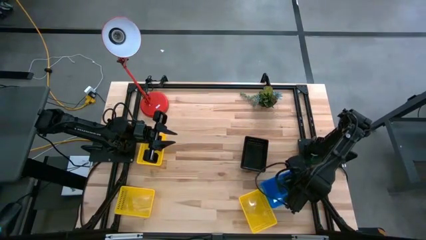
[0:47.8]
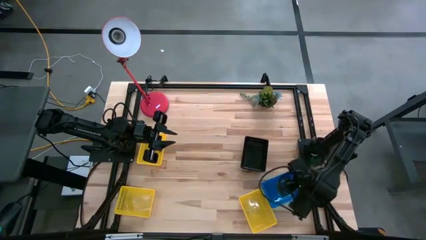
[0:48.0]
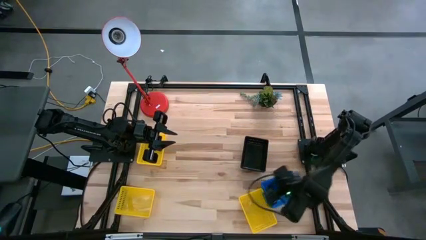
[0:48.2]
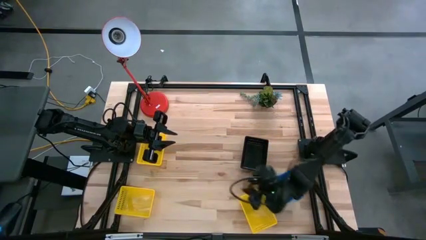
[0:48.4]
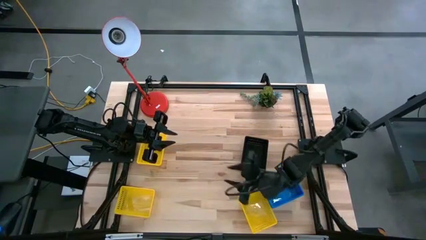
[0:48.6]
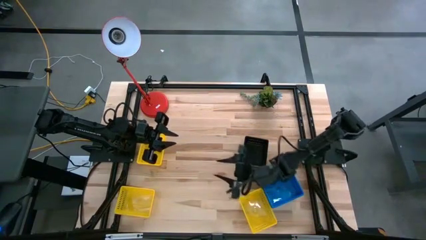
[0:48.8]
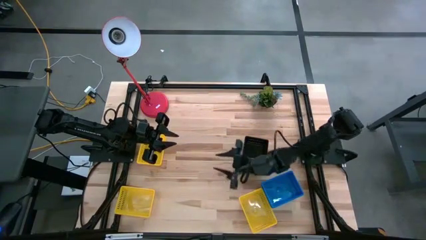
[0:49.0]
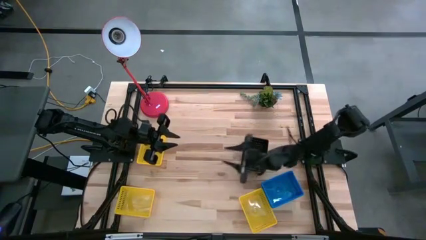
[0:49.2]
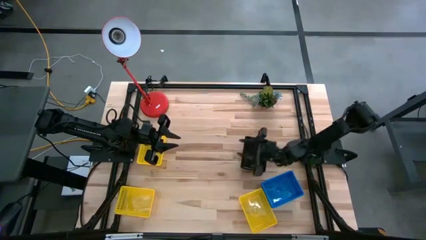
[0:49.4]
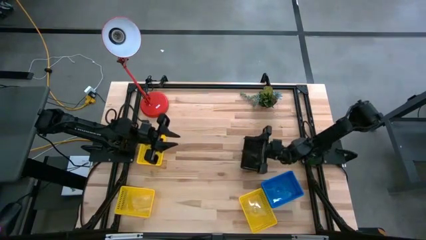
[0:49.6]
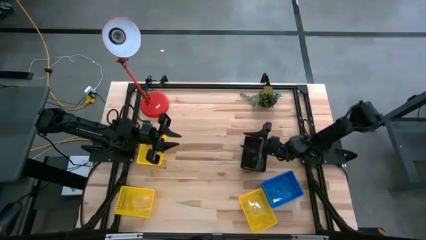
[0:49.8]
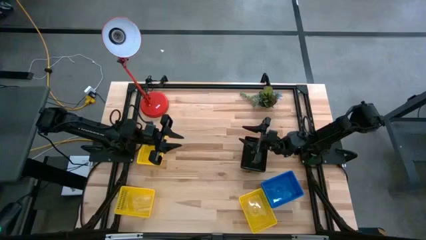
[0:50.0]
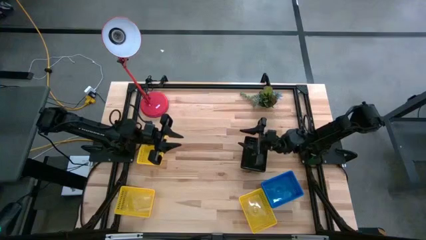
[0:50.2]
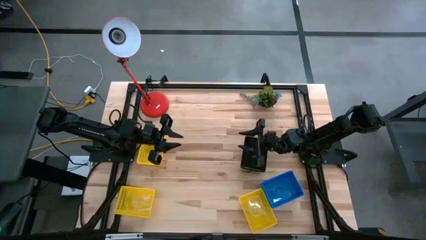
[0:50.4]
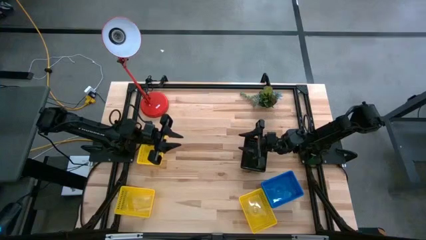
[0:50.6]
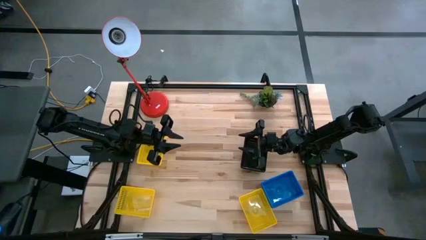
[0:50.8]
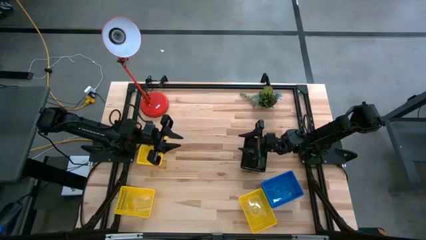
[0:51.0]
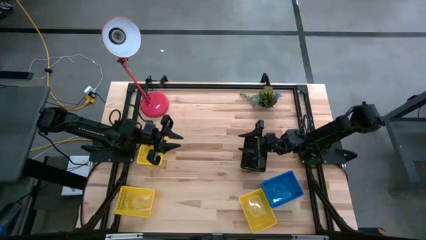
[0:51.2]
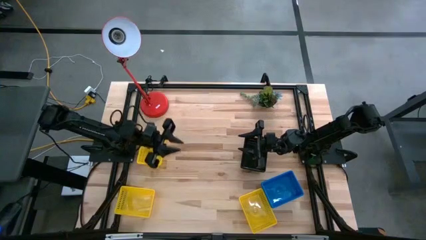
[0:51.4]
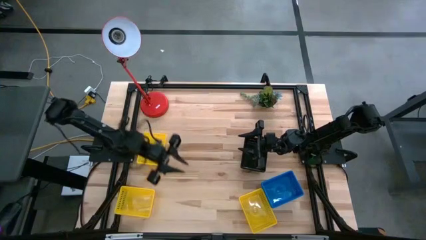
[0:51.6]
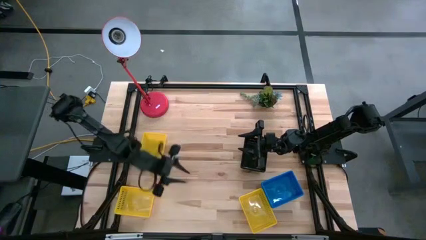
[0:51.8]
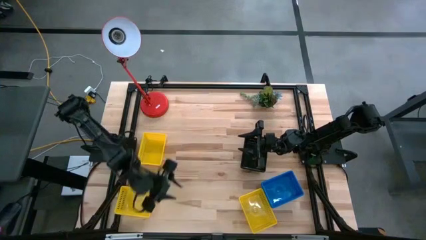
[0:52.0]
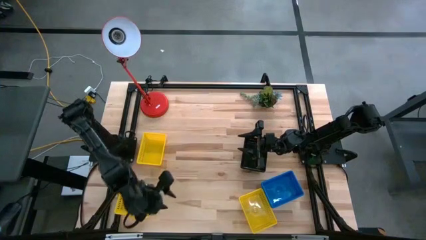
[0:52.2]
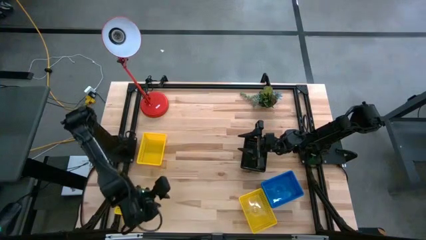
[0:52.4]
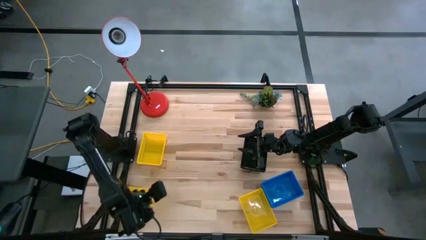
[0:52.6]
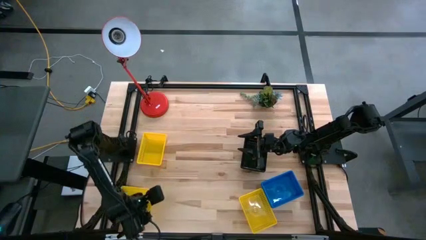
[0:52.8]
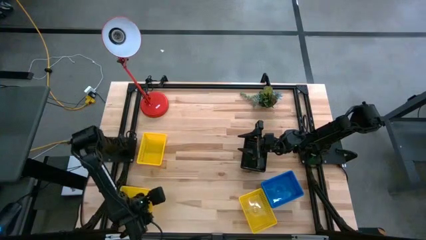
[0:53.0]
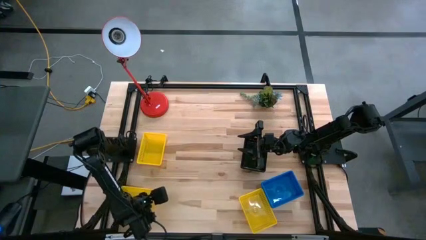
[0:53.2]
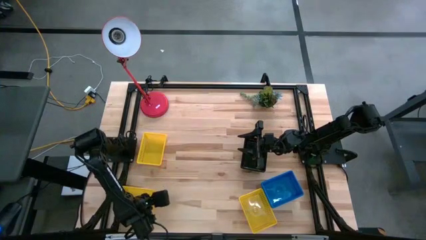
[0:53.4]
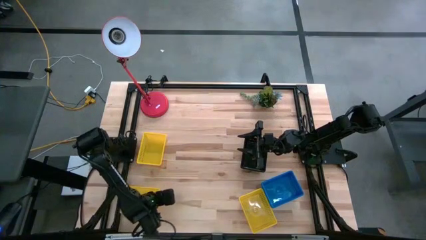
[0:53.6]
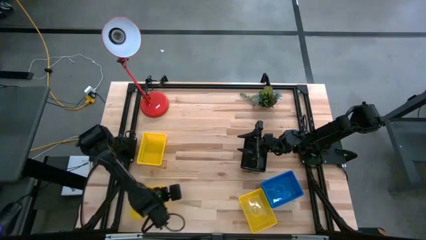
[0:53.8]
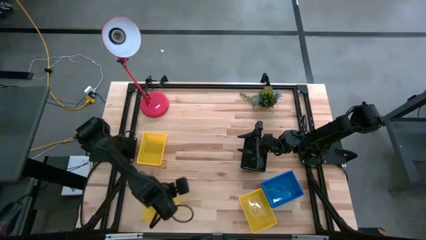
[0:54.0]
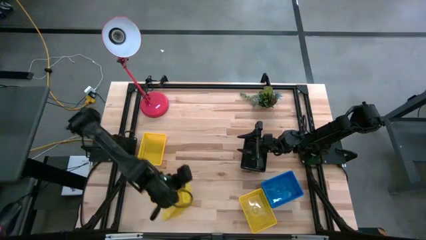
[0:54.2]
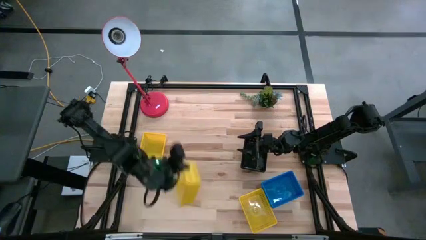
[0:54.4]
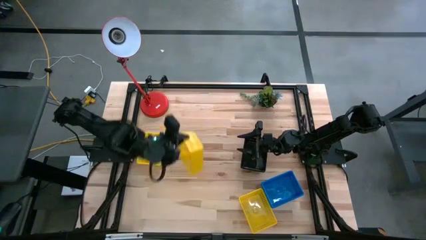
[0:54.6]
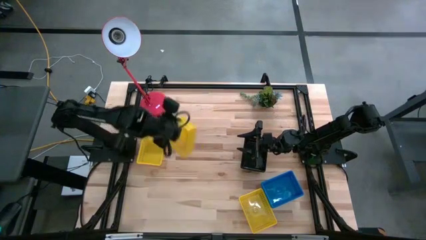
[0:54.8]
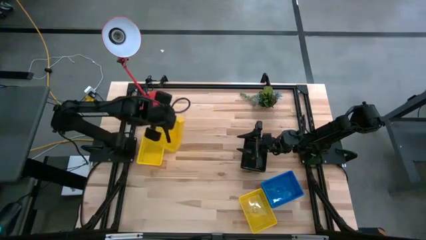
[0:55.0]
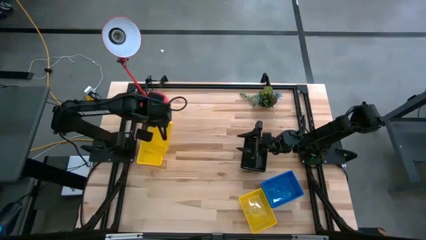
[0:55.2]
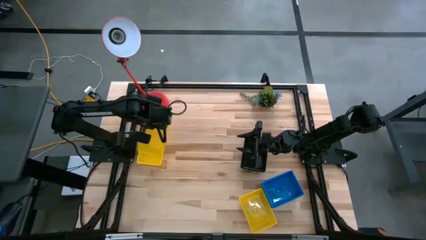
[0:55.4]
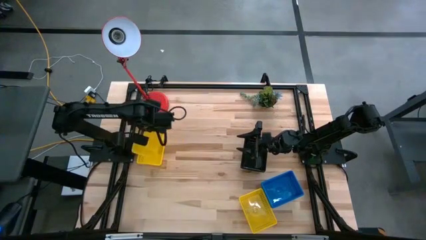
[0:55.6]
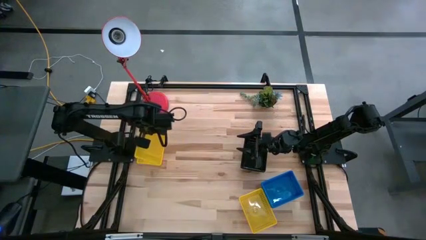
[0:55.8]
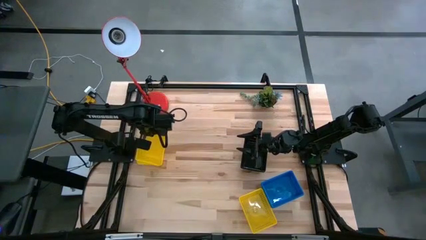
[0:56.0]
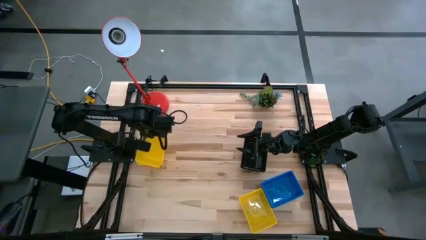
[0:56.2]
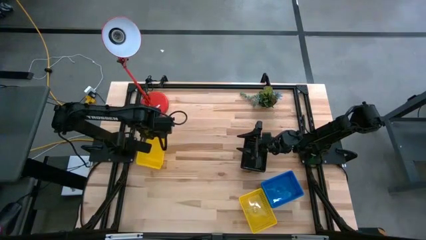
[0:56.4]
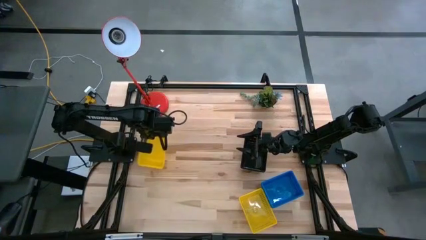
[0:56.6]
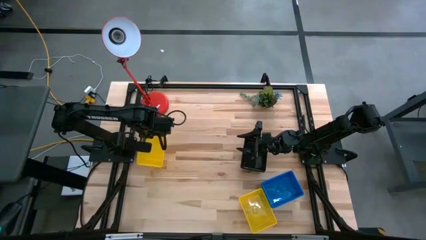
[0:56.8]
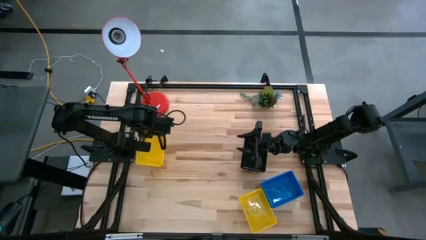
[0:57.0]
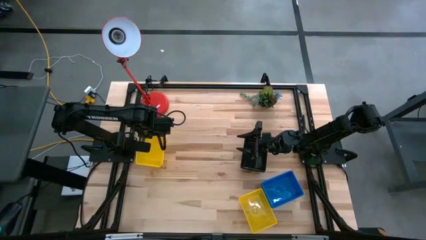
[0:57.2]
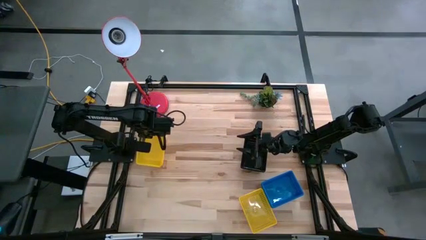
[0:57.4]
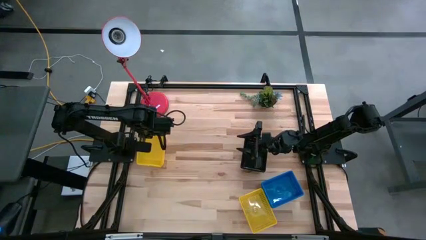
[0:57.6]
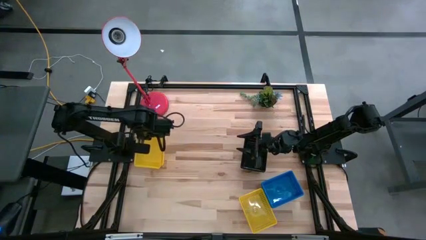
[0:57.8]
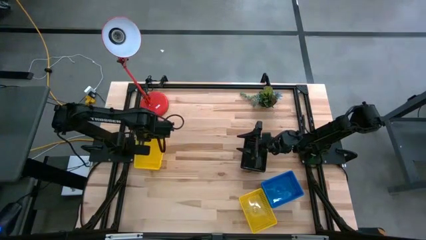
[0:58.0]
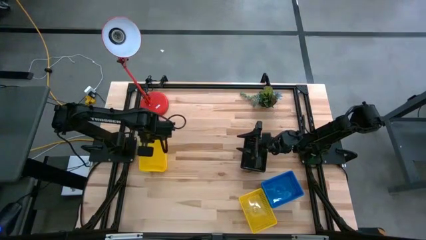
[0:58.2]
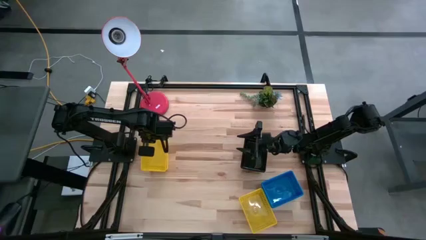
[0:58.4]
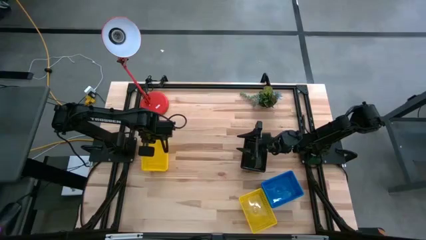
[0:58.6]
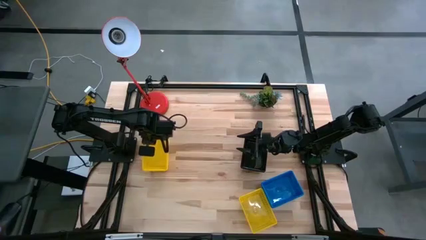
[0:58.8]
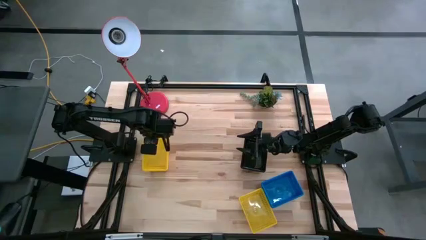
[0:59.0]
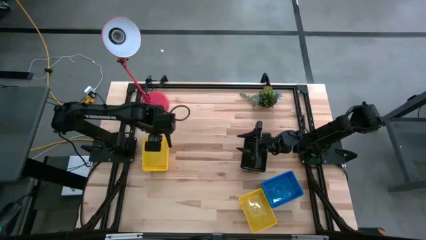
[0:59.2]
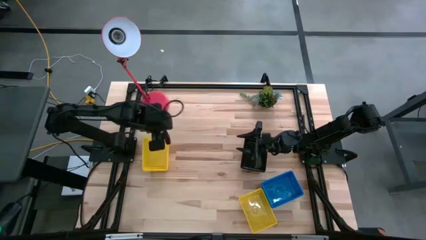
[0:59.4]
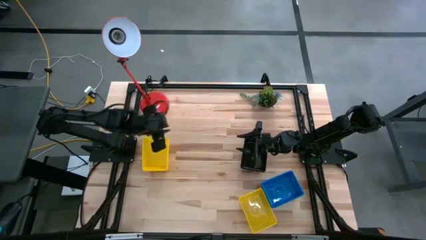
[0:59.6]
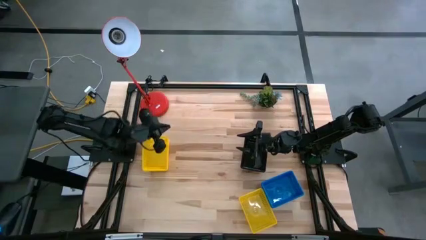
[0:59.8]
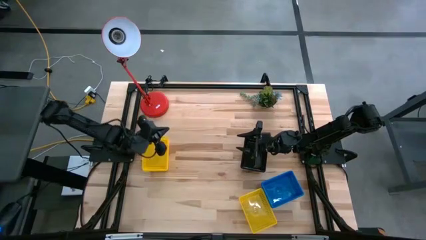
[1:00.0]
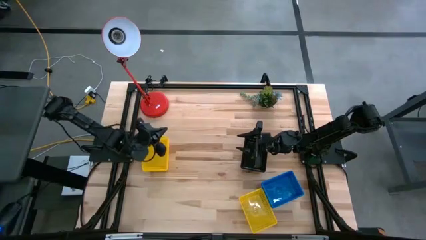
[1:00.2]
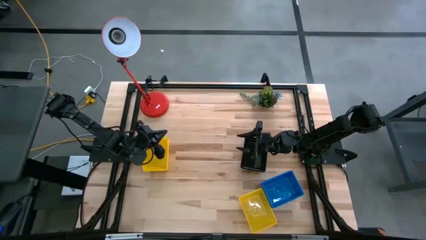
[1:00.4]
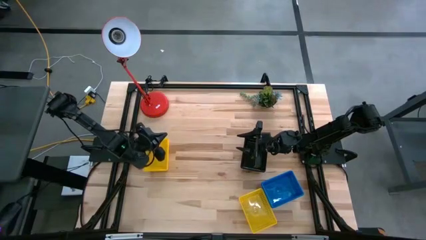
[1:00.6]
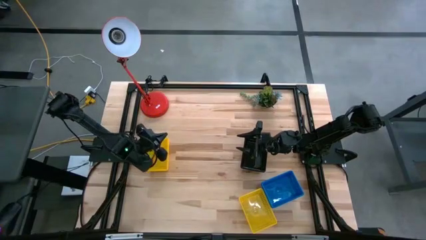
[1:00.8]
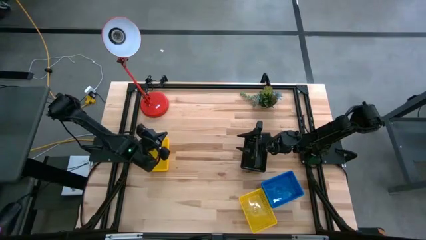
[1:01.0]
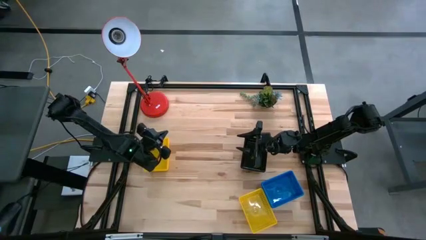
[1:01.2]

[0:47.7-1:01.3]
Stack the bottom left yellow basket on the top yellow basket
